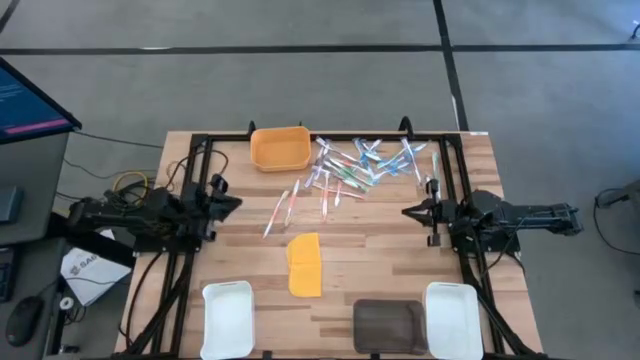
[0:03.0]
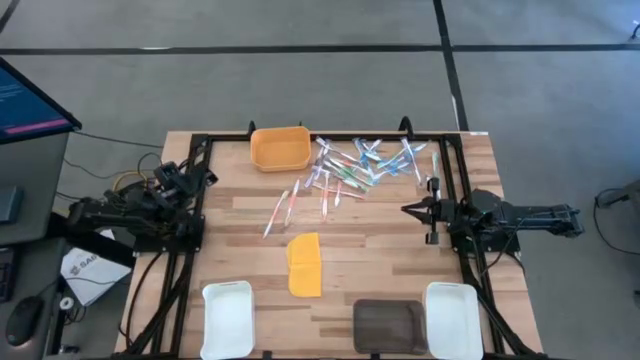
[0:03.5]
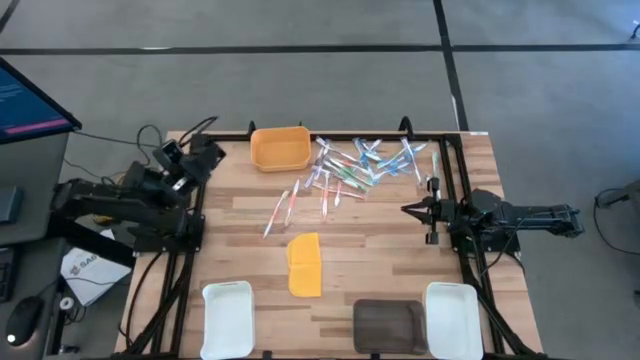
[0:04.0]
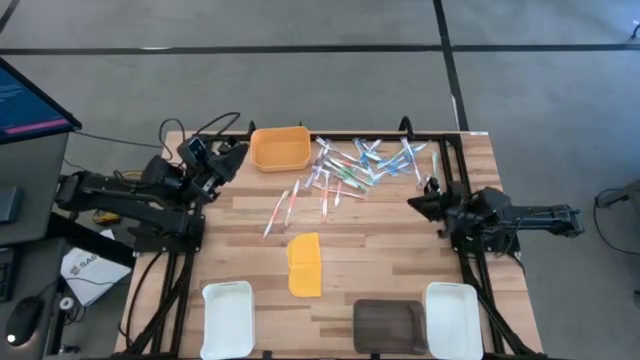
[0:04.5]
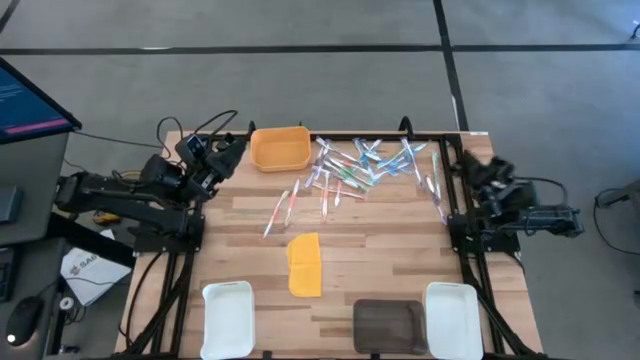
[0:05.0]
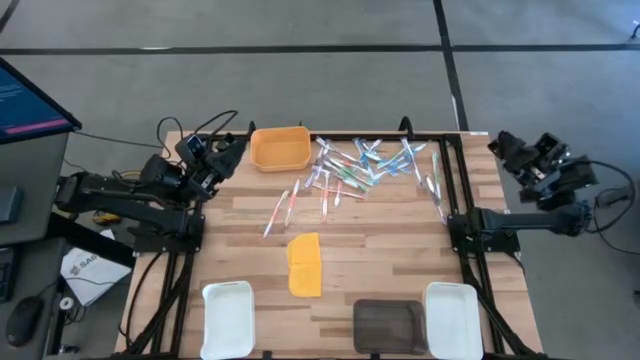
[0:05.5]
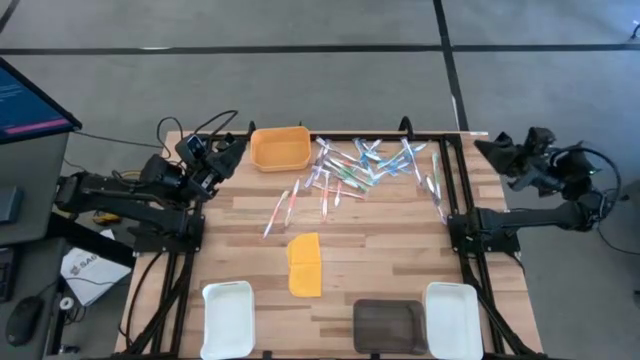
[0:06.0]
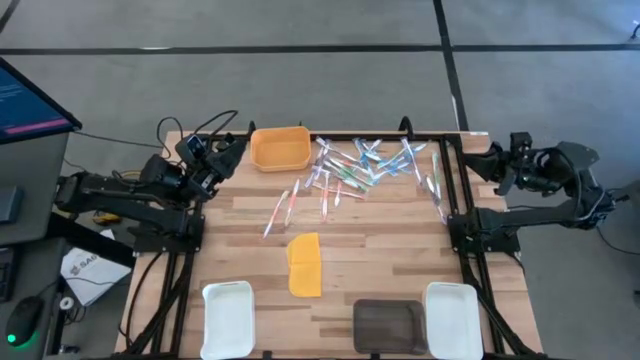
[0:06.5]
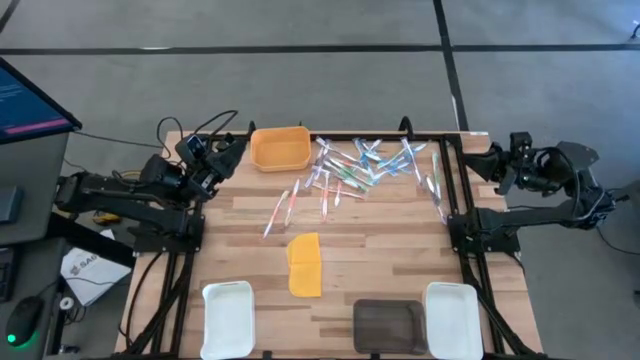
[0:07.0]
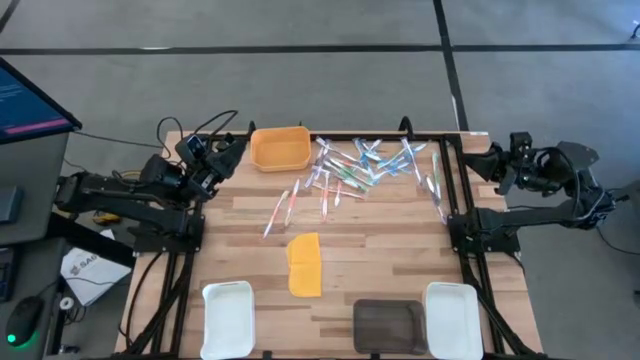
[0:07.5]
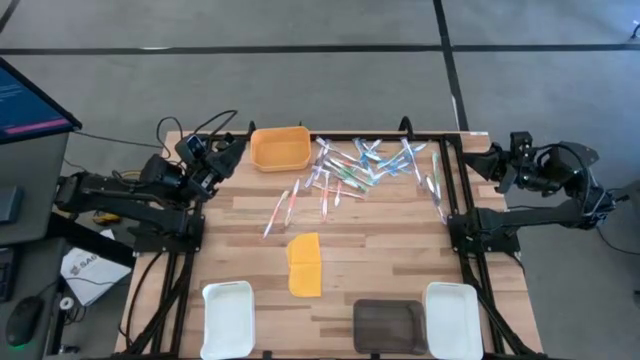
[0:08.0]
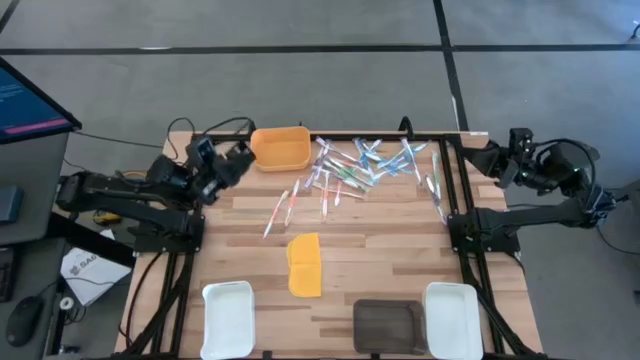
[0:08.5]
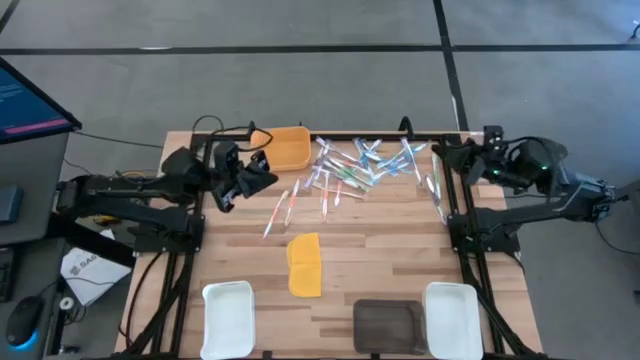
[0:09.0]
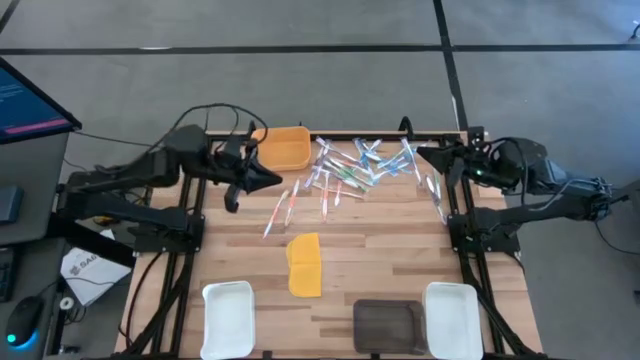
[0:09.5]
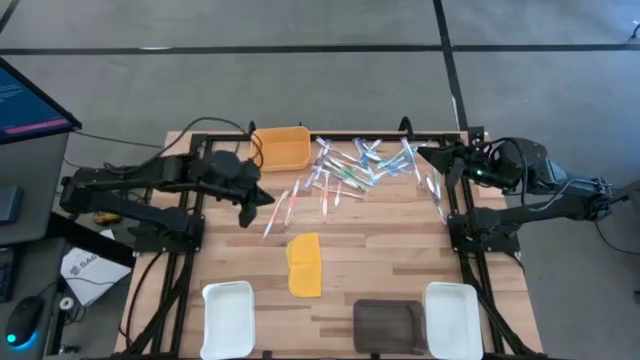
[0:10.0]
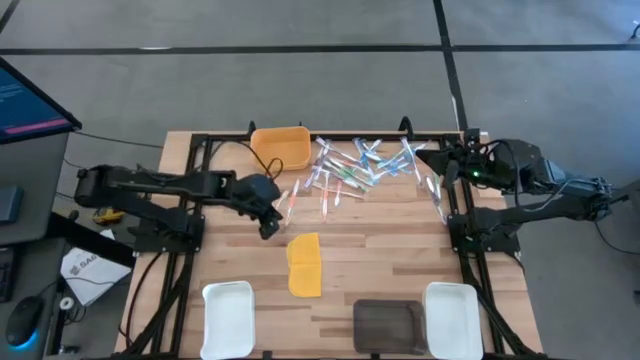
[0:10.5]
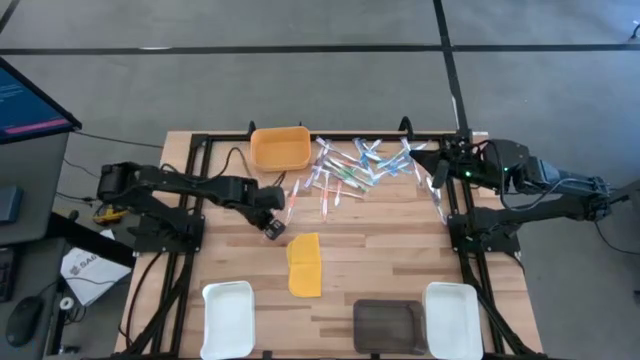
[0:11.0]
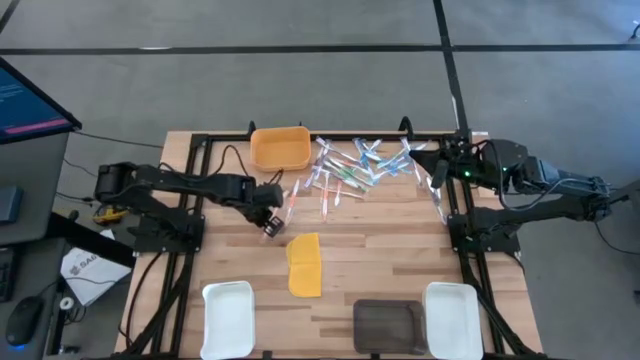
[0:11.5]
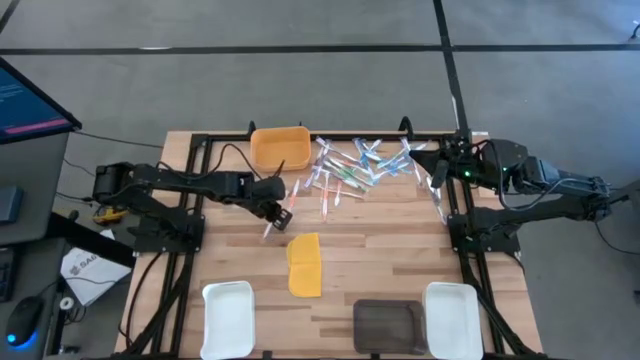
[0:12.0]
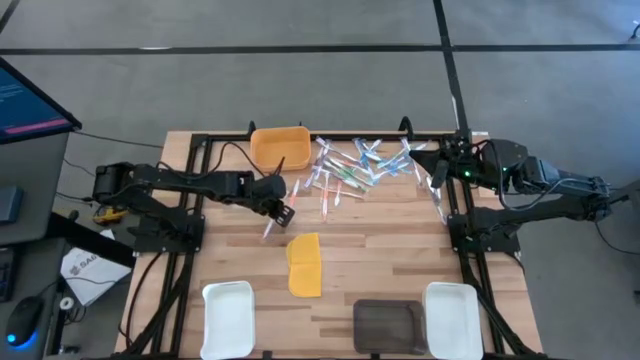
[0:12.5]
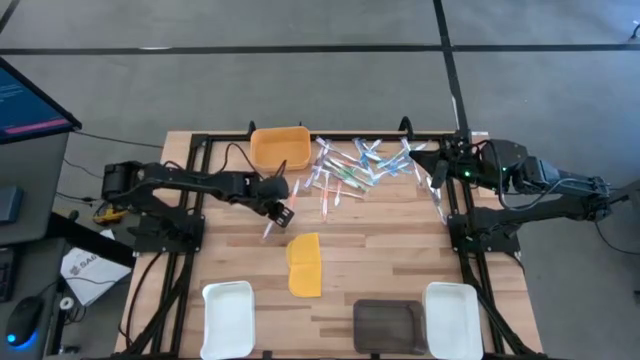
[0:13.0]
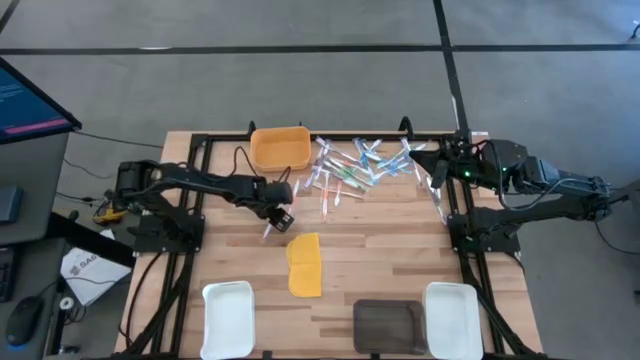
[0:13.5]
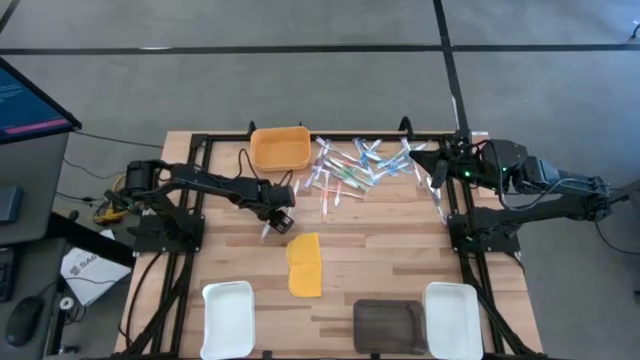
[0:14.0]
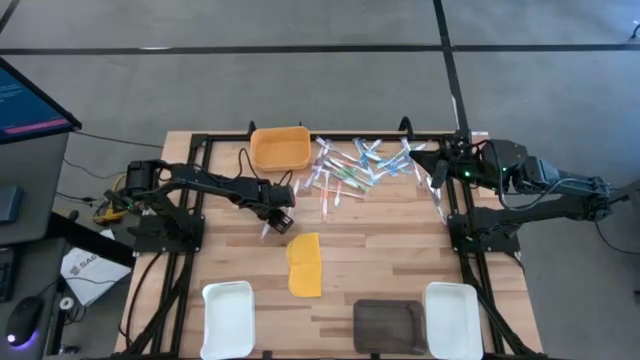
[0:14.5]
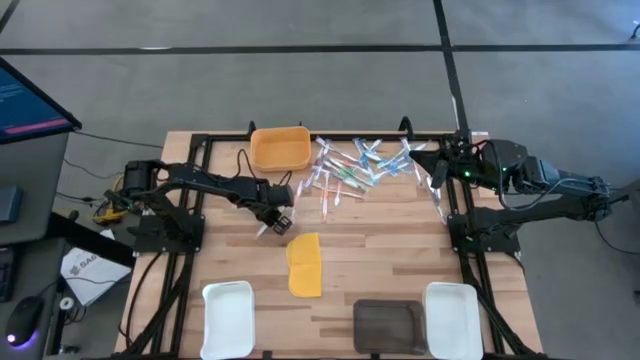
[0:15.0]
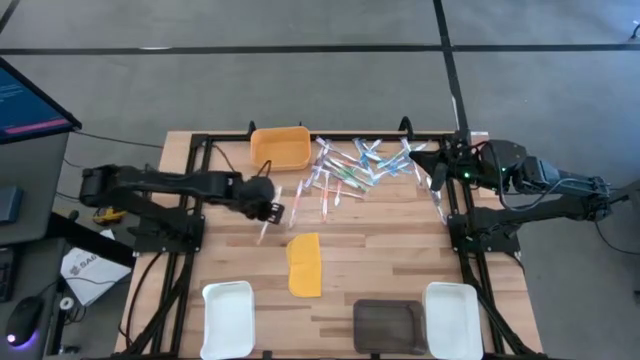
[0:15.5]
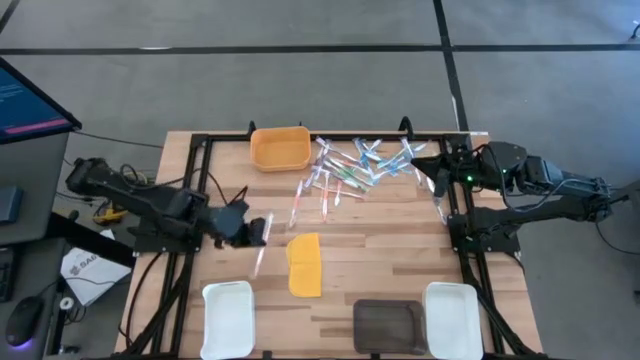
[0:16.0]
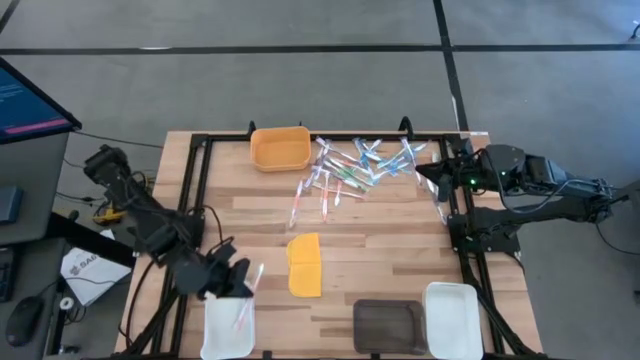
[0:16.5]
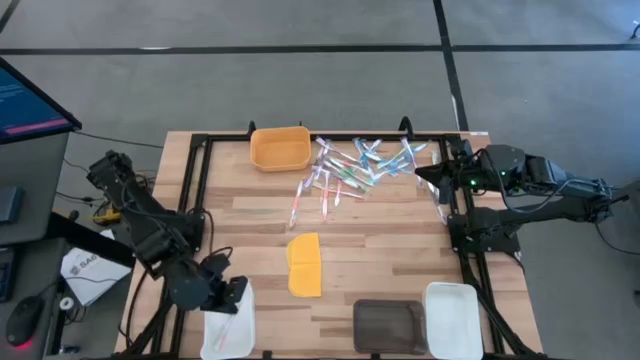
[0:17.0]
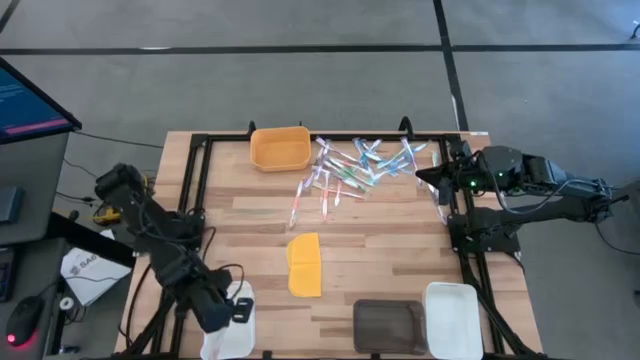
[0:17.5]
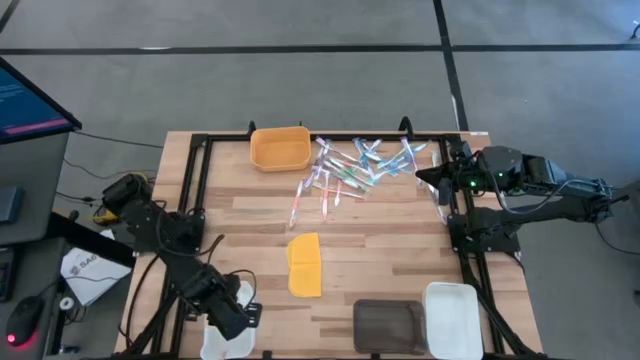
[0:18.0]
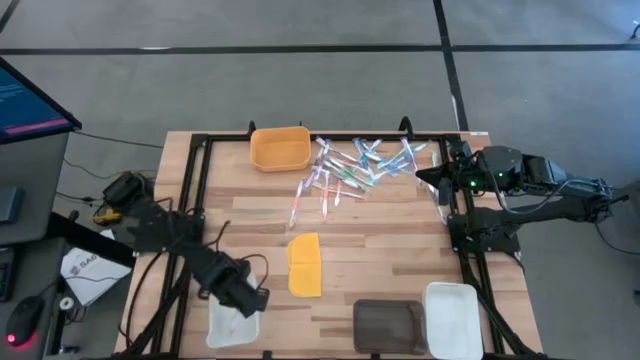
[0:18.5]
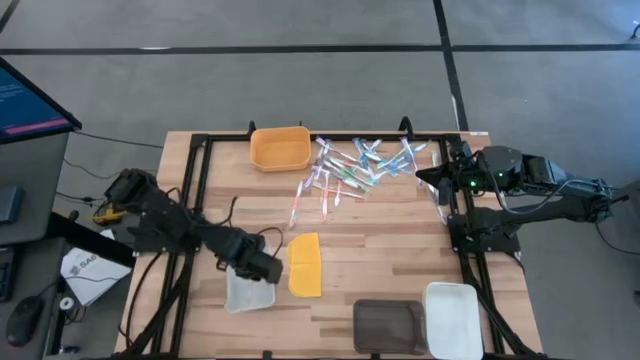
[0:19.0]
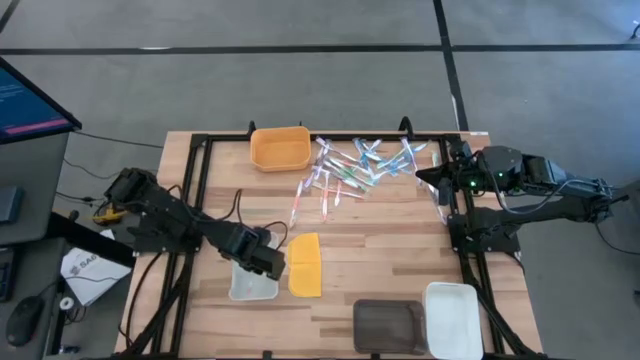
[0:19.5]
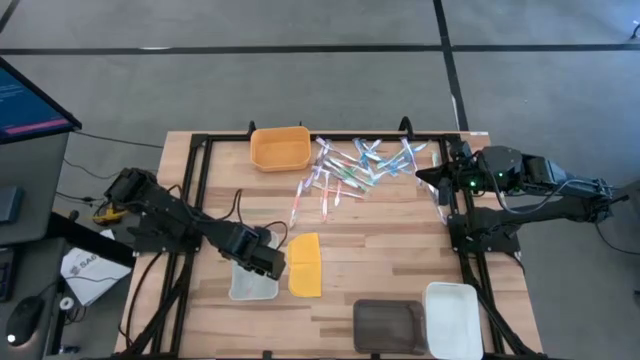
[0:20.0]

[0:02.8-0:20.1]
Task: Pick & Place Toothbrushes
Put the orange toothbrush into the left white bin

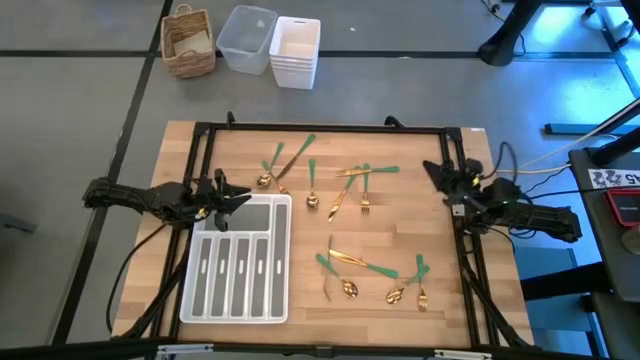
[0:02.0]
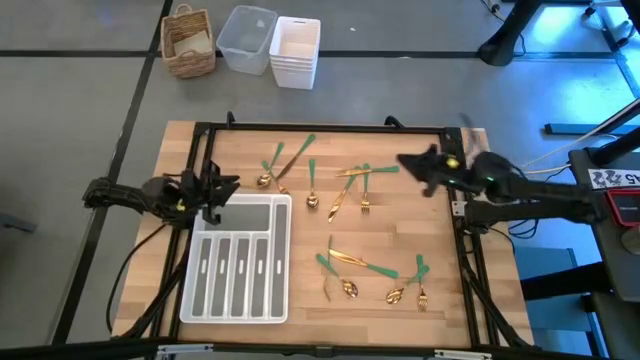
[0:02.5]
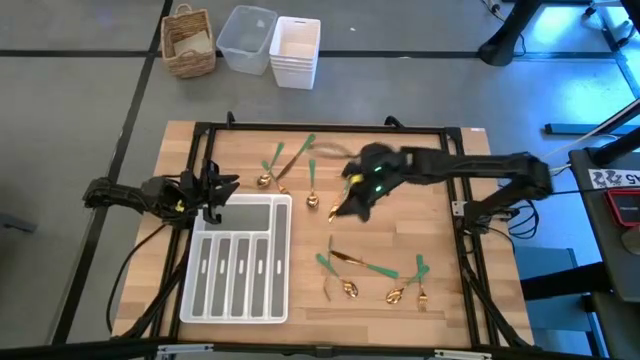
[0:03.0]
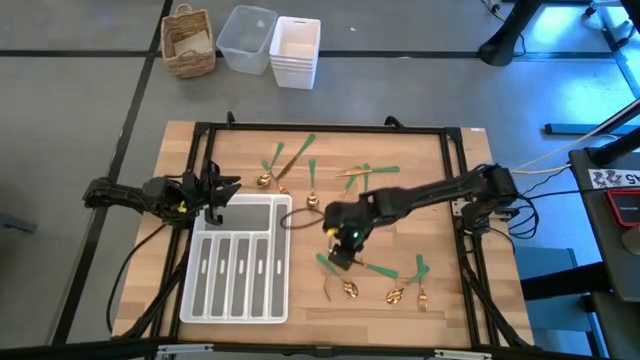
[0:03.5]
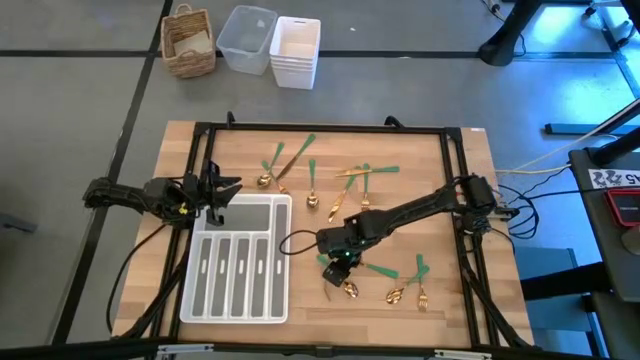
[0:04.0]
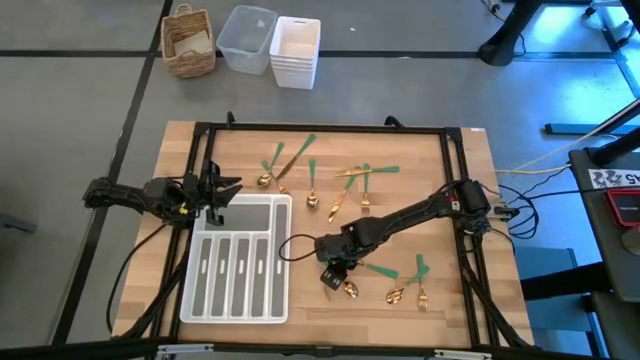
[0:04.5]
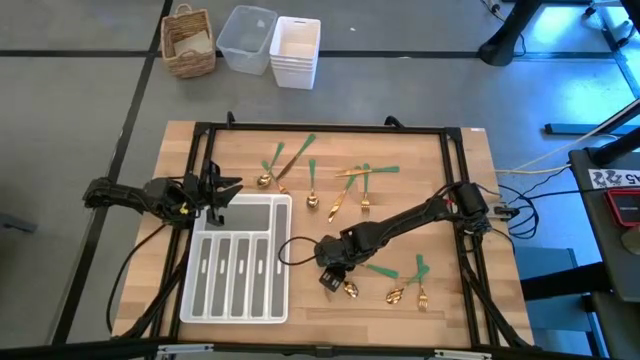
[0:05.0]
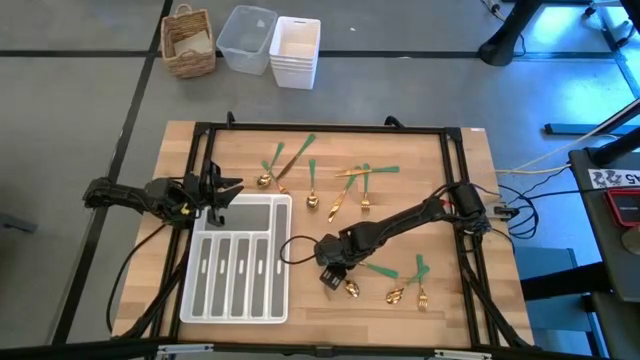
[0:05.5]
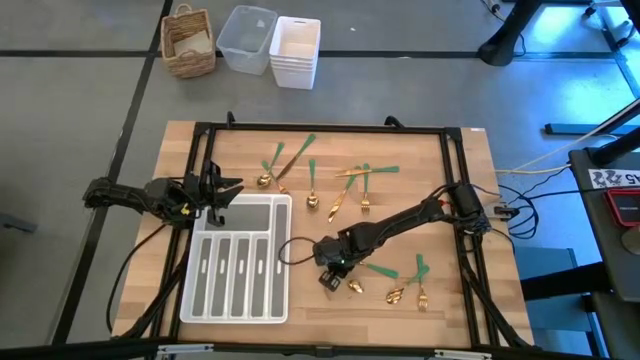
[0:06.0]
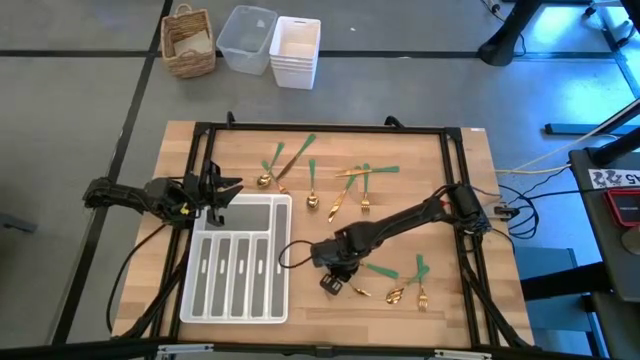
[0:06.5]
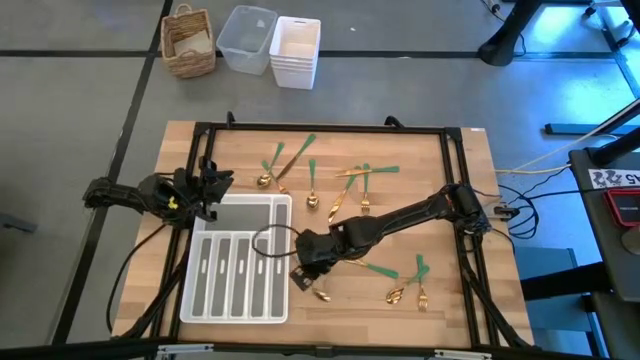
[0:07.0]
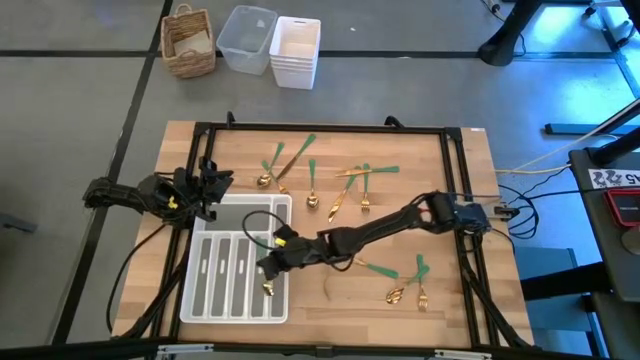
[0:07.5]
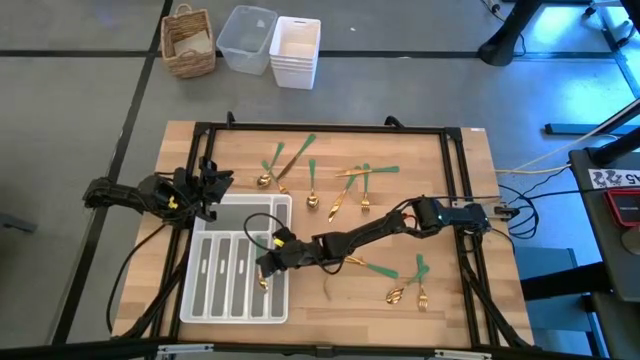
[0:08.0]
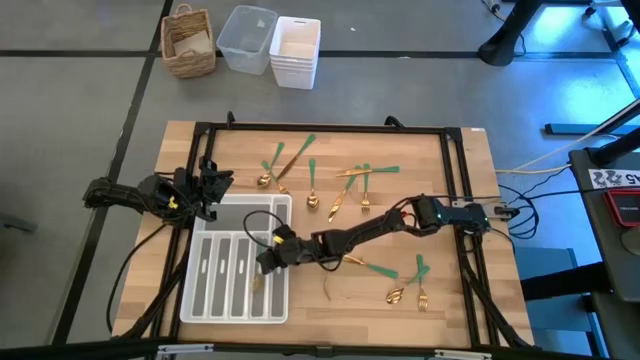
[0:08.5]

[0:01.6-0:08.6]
Task: Sort silverware
Put the green spoon on the silverware tray
